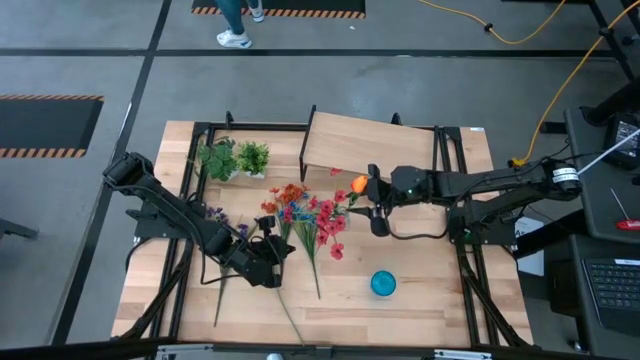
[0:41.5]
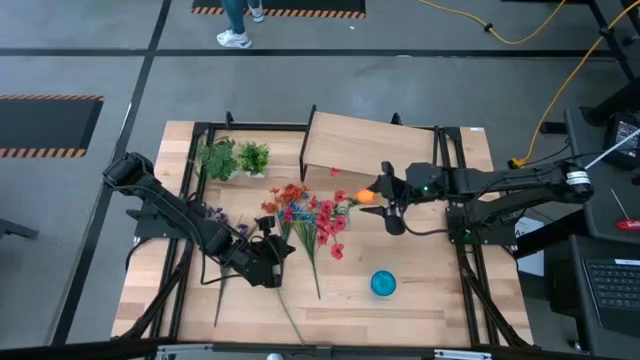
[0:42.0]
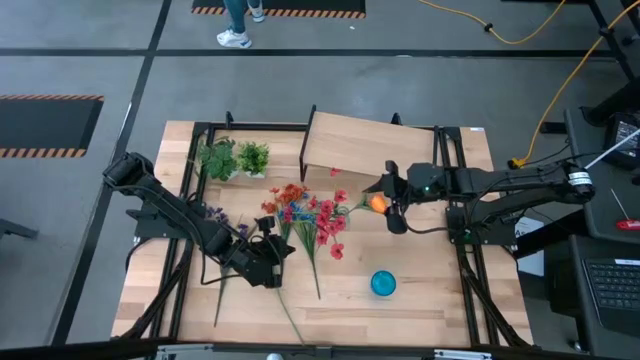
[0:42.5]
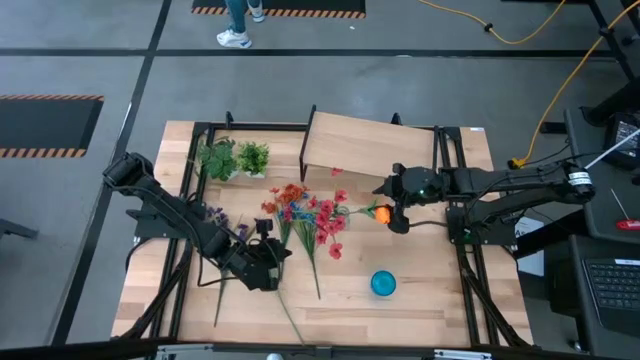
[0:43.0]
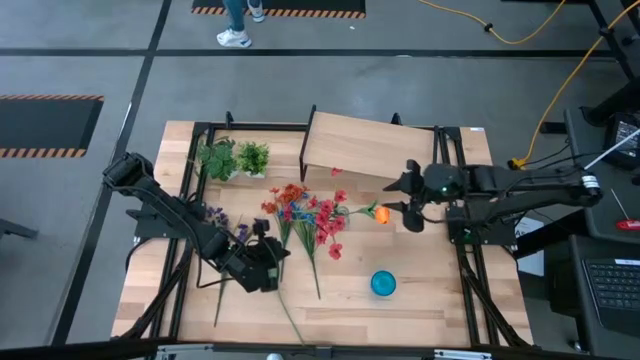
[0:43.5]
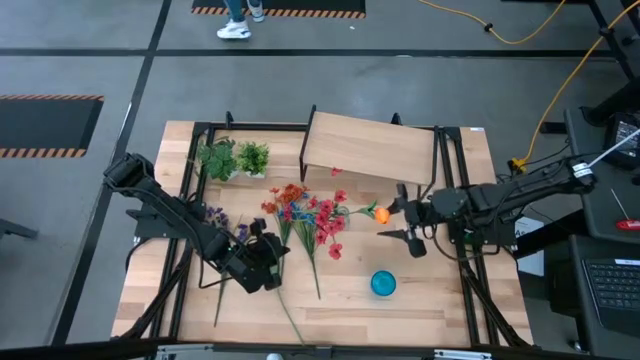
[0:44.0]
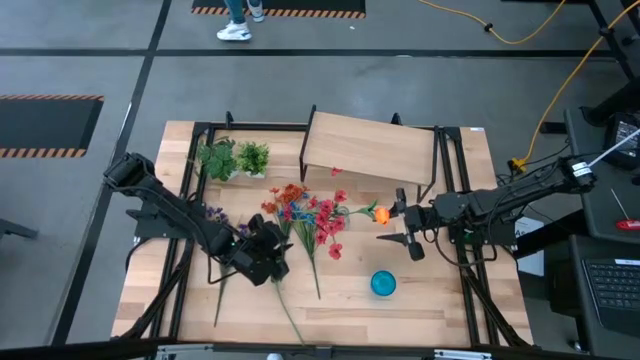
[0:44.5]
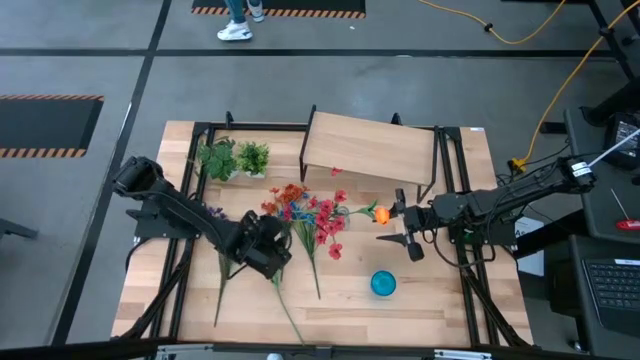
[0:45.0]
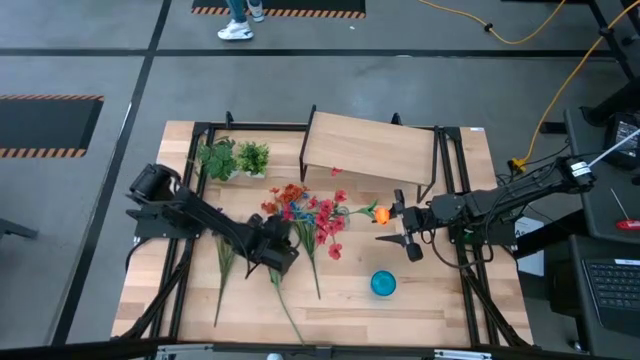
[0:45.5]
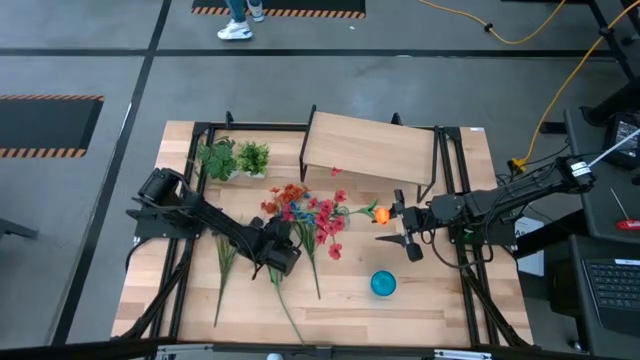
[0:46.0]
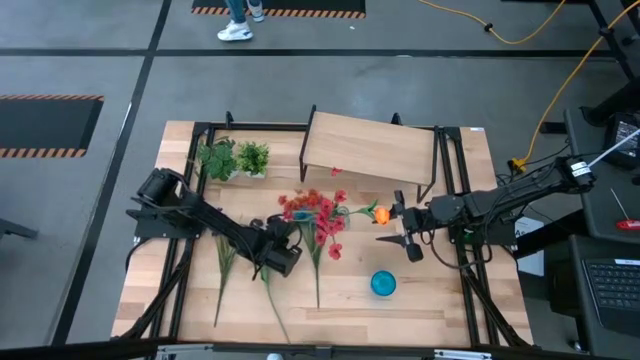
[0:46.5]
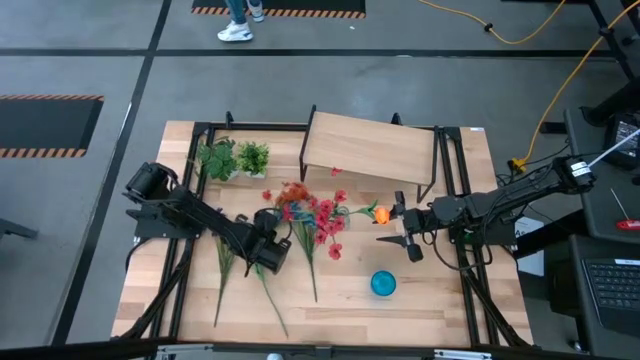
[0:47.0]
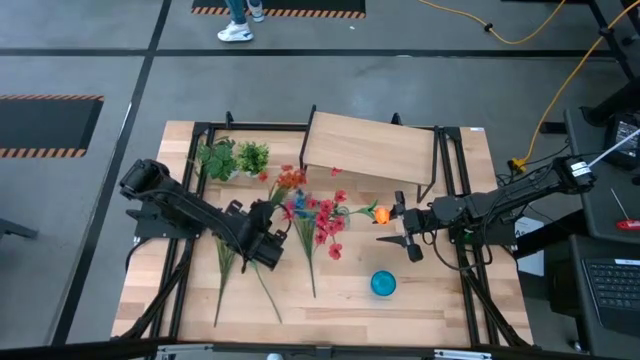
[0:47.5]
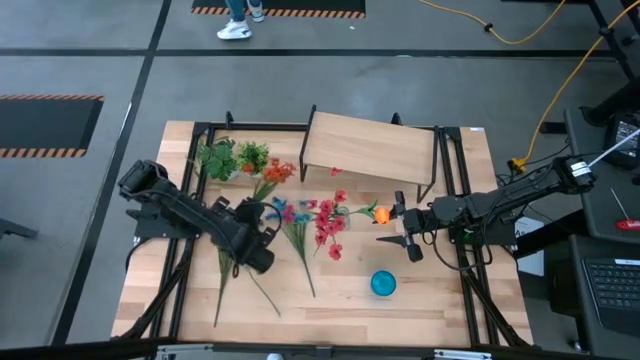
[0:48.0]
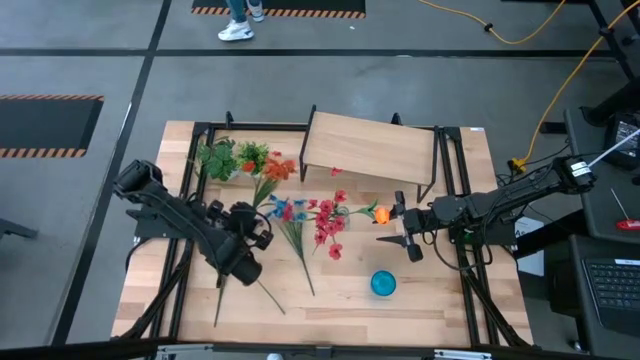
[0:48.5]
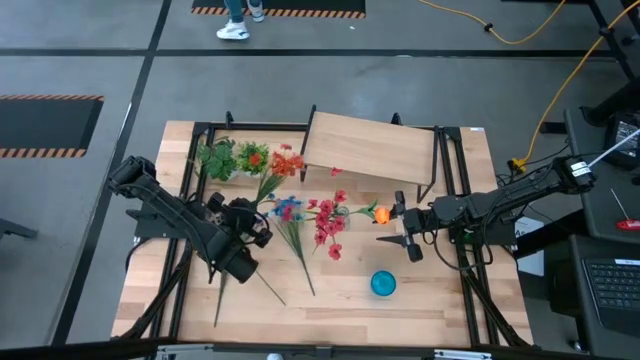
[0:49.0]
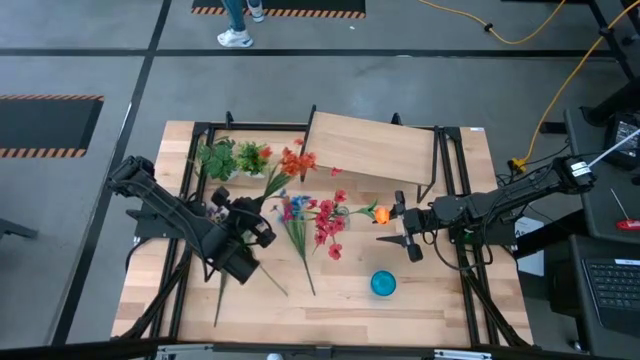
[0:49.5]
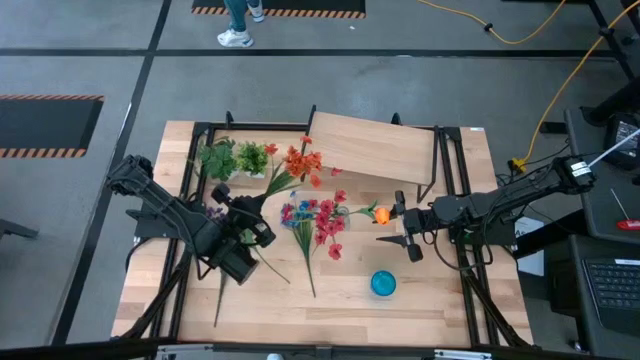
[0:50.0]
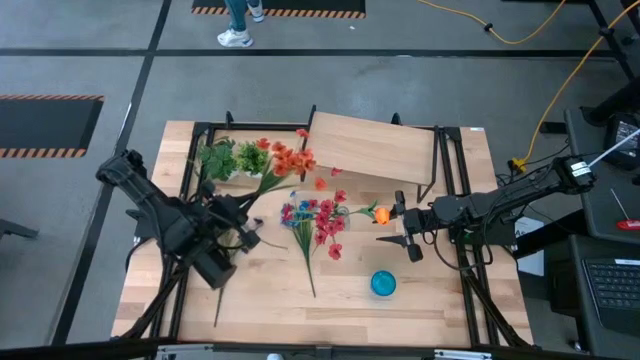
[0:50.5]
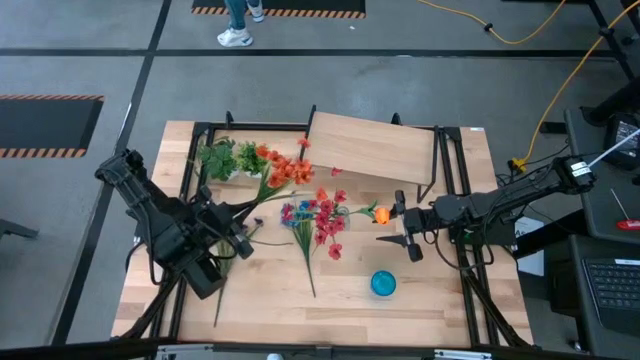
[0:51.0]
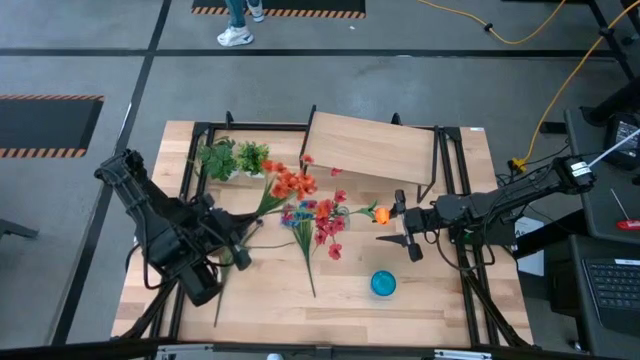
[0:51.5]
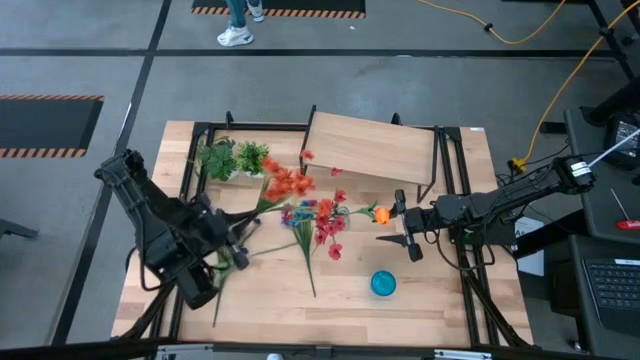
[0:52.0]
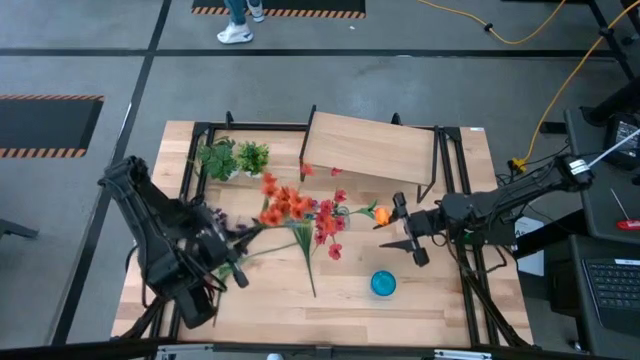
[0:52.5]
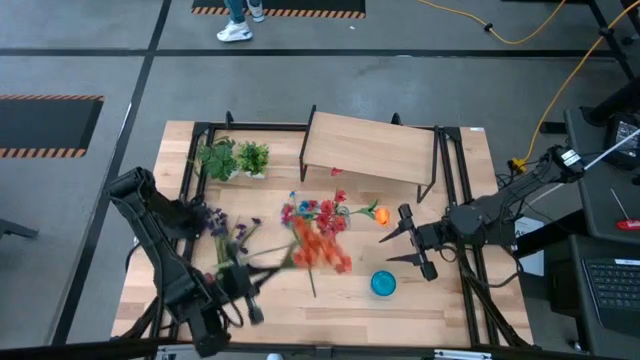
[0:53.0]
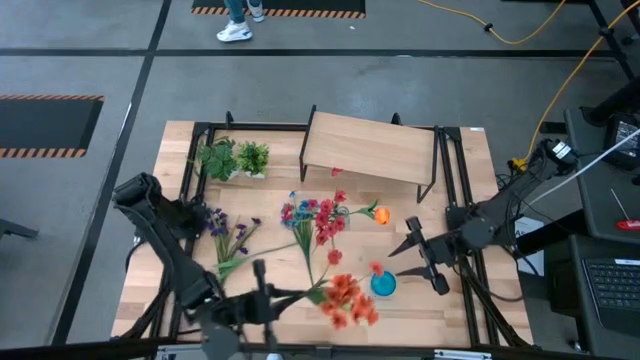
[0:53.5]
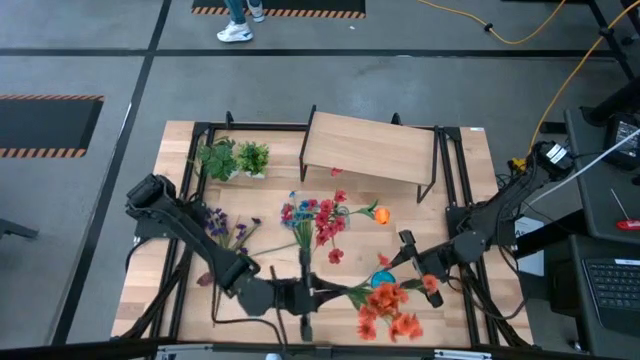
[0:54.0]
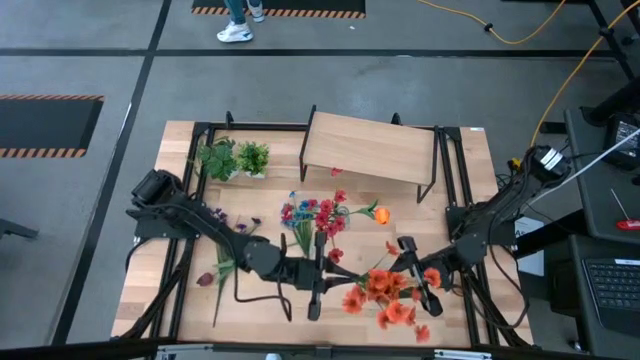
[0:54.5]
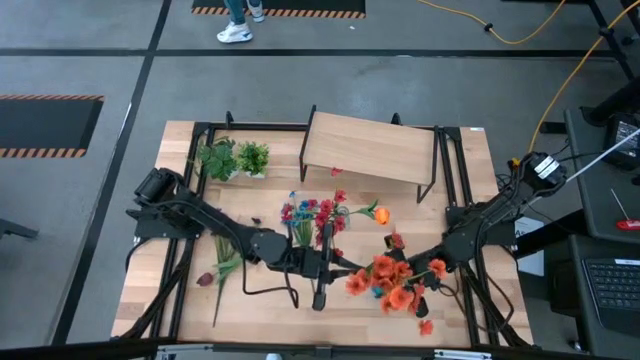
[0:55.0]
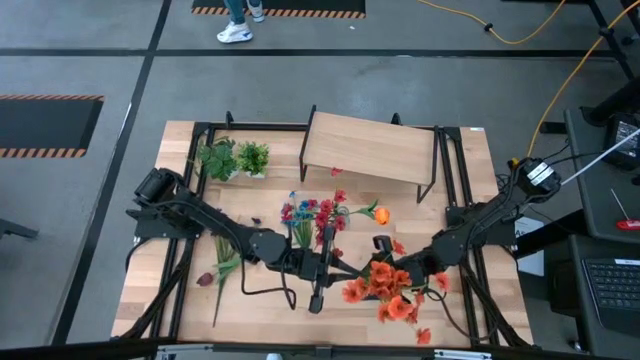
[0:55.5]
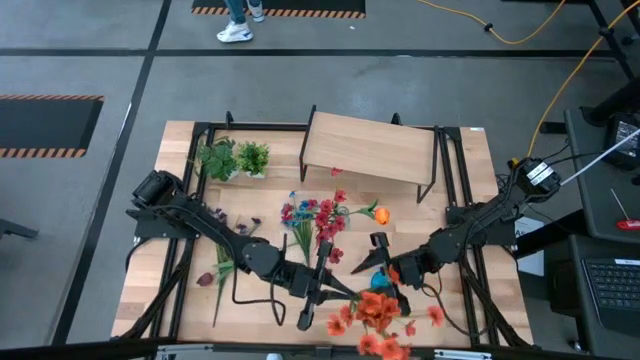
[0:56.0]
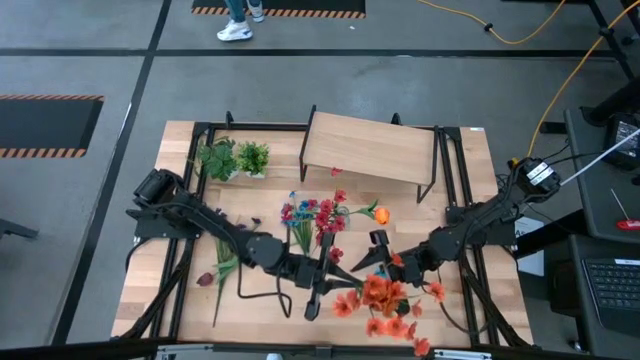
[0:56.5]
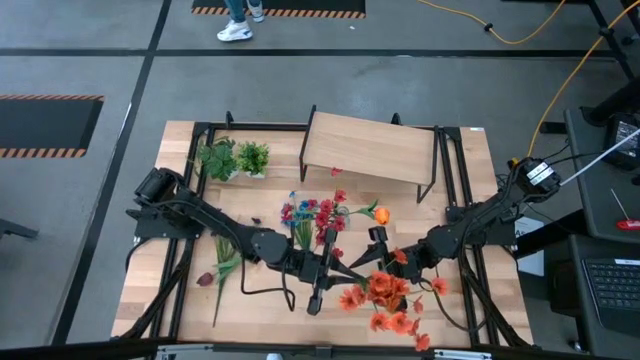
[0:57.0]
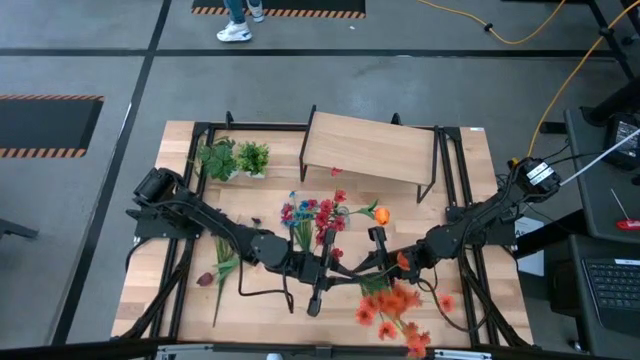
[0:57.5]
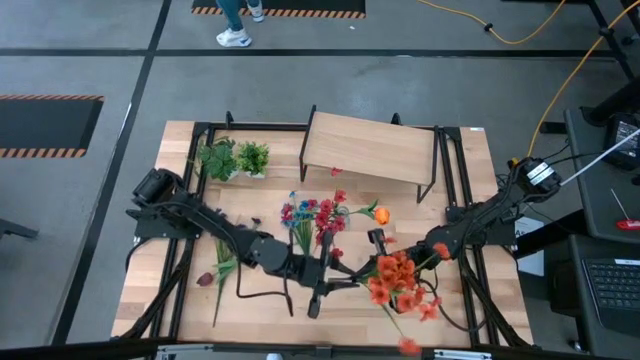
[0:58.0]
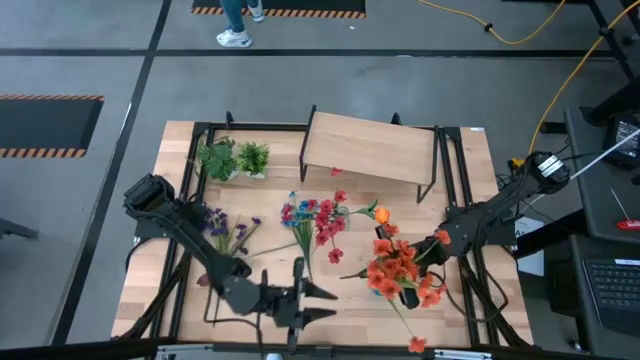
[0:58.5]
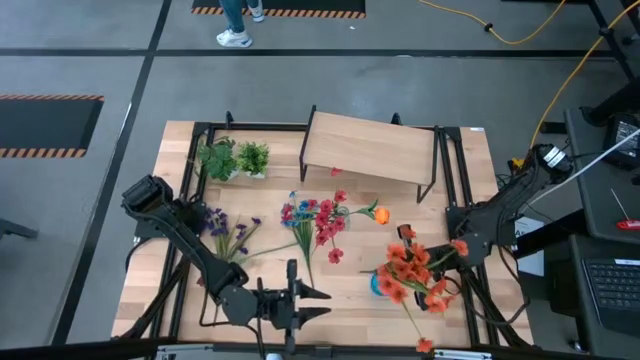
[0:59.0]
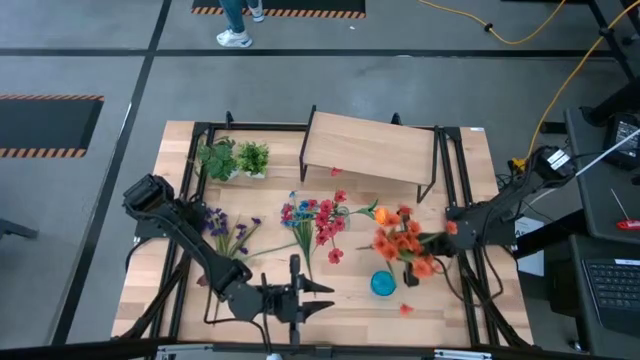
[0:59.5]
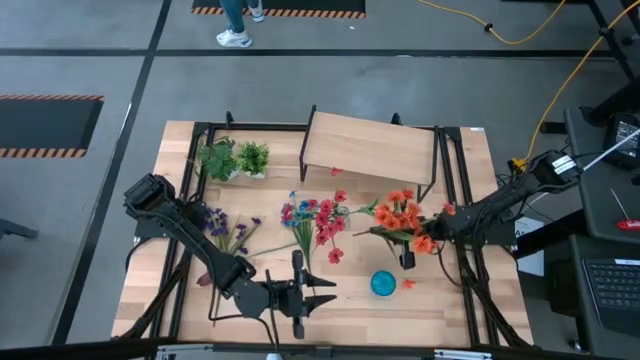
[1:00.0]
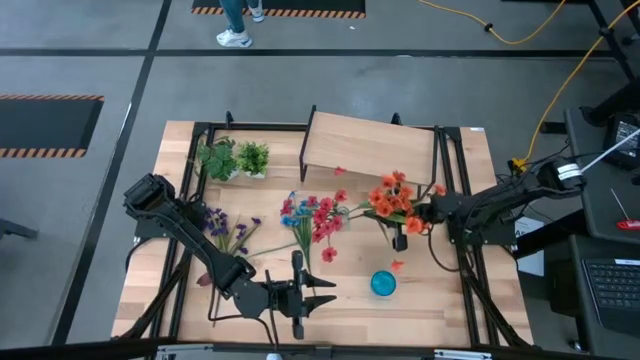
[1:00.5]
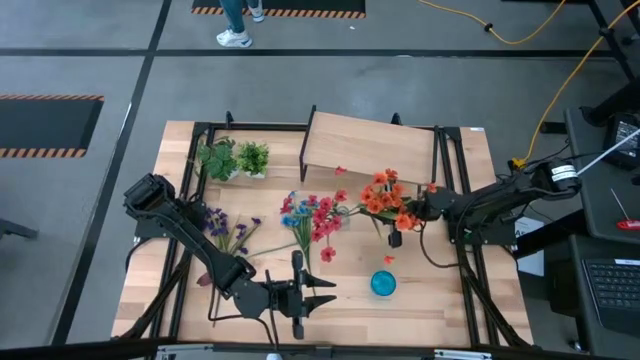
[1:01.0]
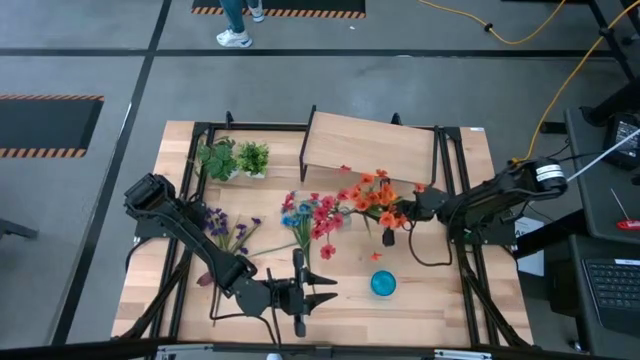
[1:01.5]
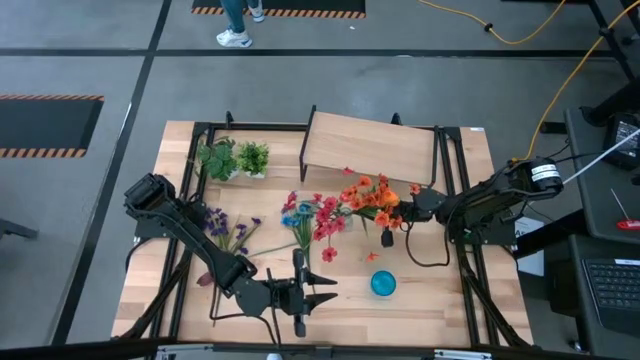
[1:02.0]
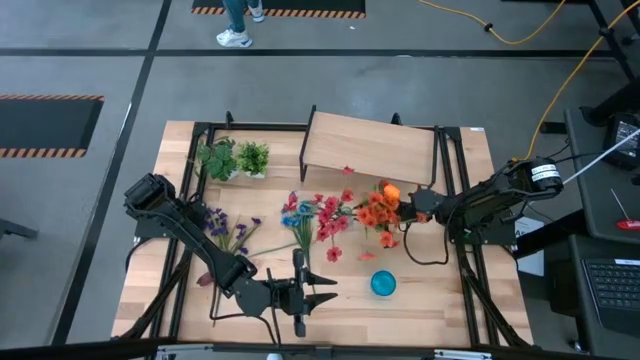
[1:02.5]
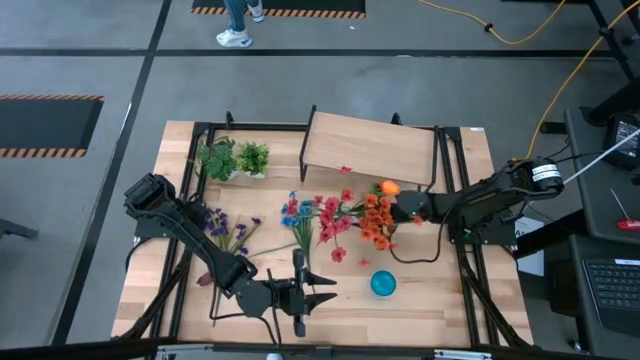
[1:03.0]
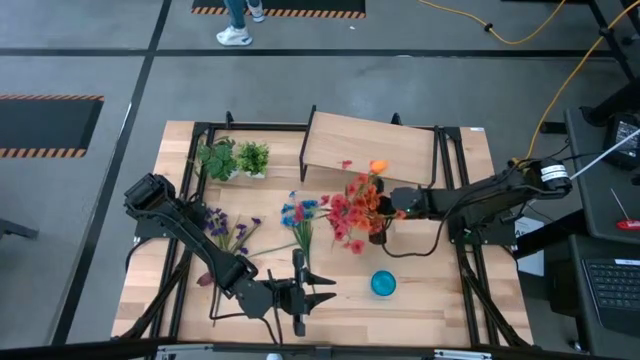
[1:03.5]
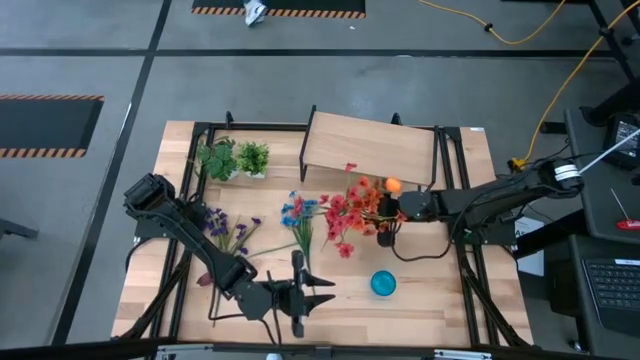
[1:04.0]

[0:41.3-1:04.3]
Task: Pick and place flowers into a vace then onto a shelf
Put the orange flowers into the transparent vase
